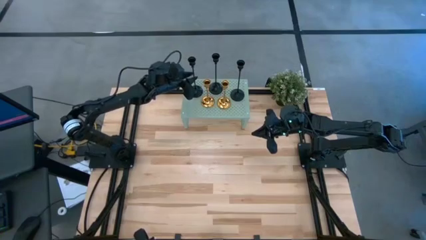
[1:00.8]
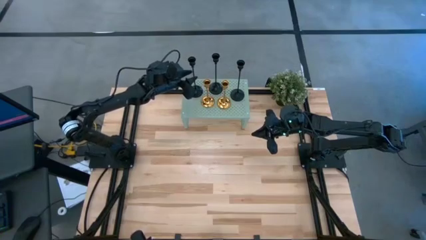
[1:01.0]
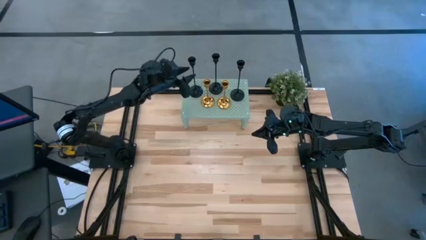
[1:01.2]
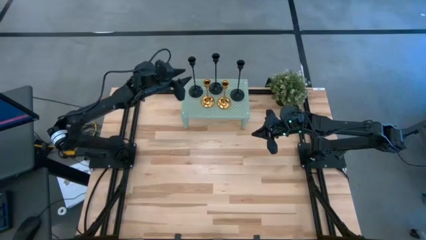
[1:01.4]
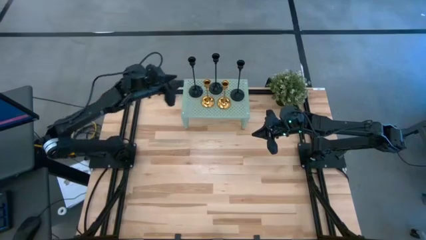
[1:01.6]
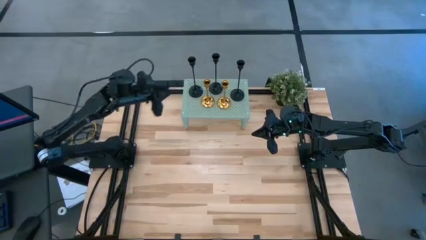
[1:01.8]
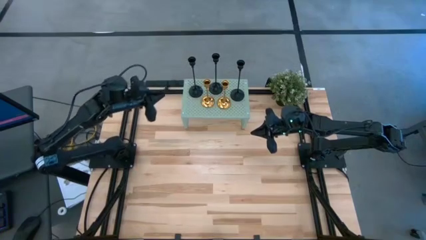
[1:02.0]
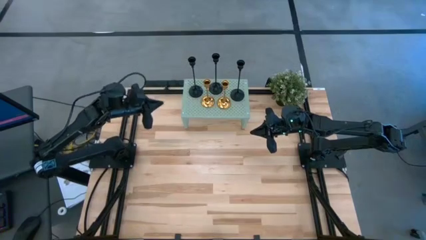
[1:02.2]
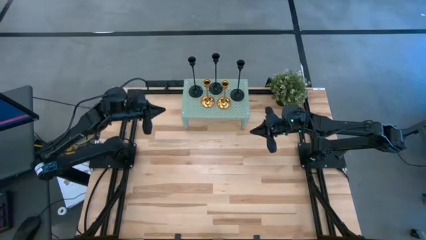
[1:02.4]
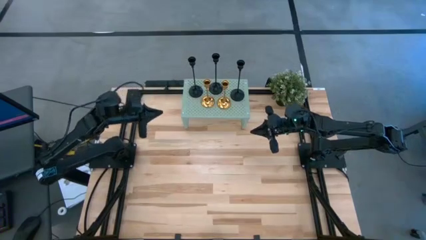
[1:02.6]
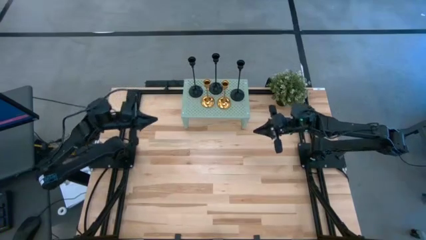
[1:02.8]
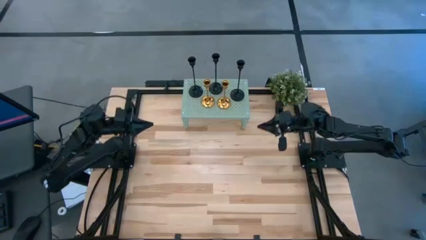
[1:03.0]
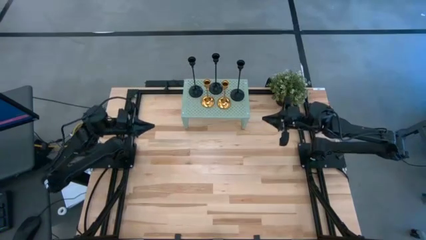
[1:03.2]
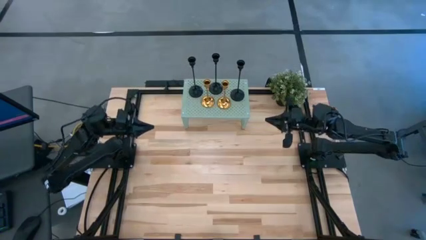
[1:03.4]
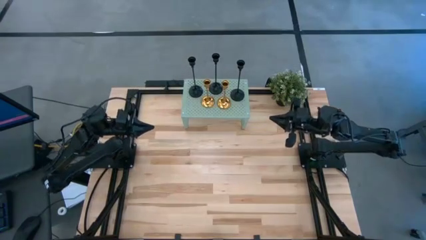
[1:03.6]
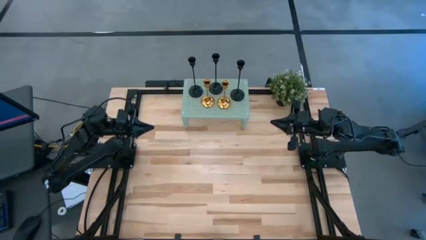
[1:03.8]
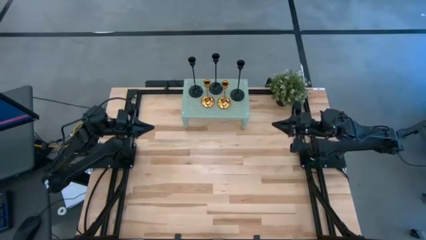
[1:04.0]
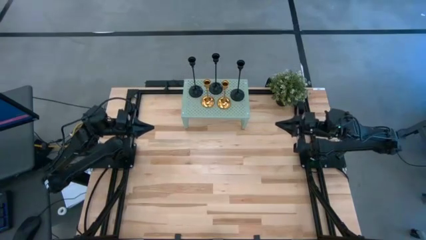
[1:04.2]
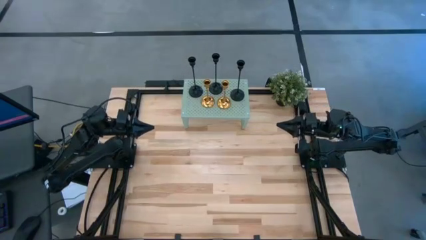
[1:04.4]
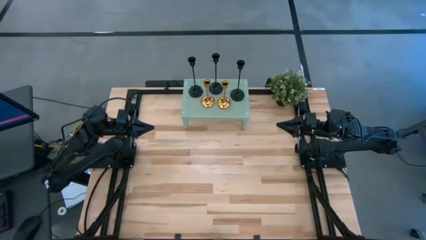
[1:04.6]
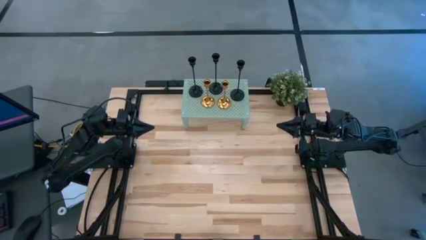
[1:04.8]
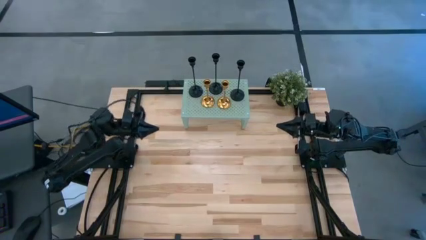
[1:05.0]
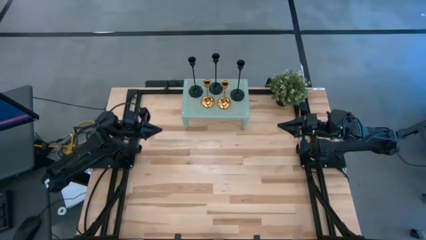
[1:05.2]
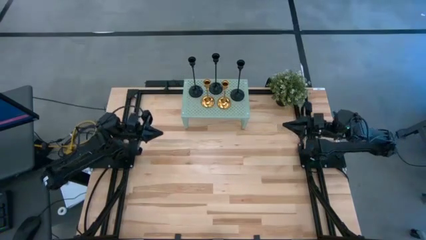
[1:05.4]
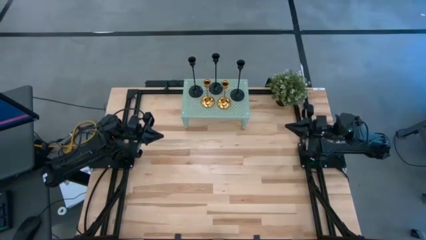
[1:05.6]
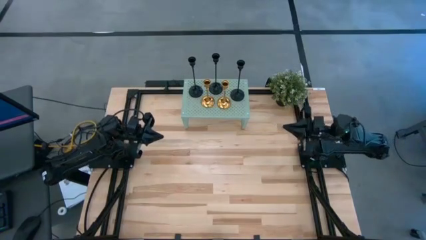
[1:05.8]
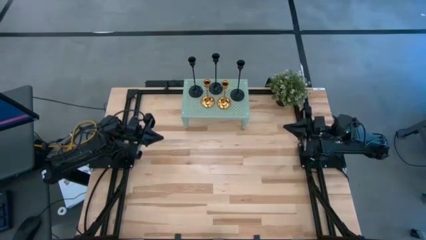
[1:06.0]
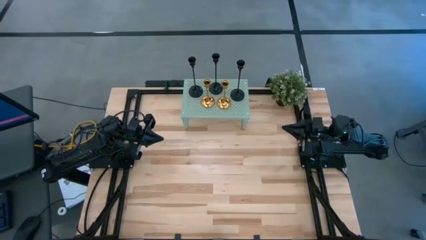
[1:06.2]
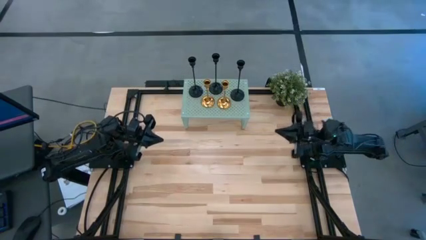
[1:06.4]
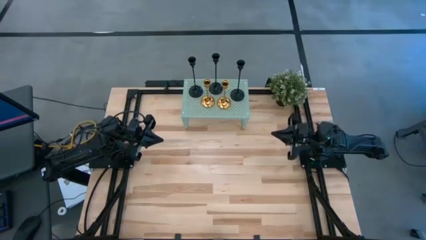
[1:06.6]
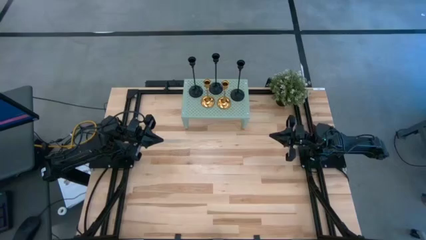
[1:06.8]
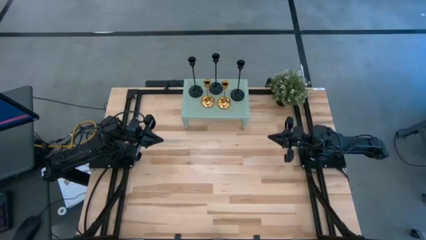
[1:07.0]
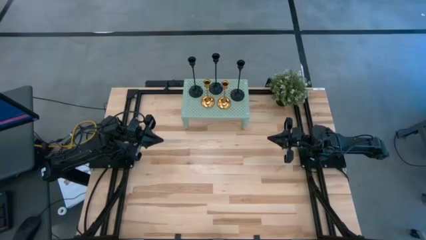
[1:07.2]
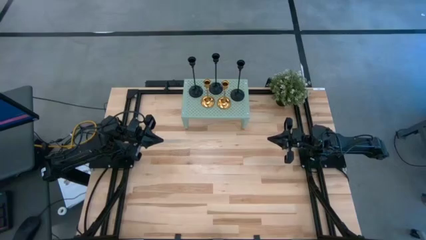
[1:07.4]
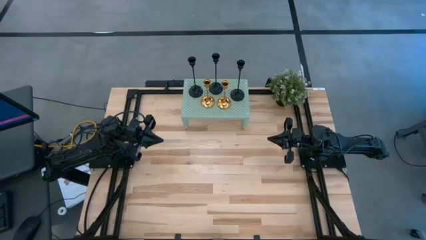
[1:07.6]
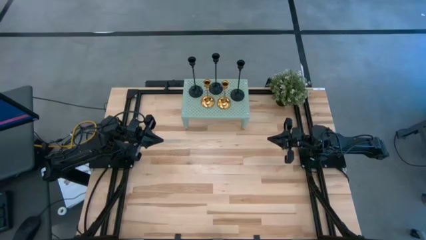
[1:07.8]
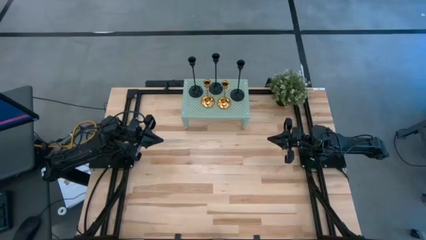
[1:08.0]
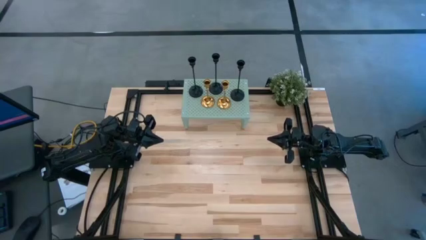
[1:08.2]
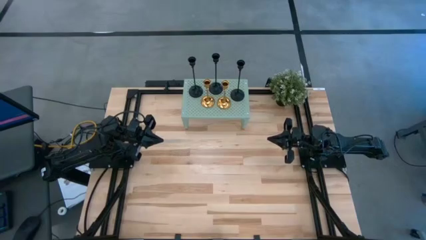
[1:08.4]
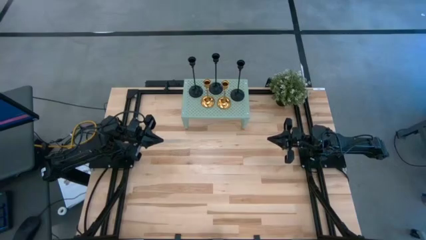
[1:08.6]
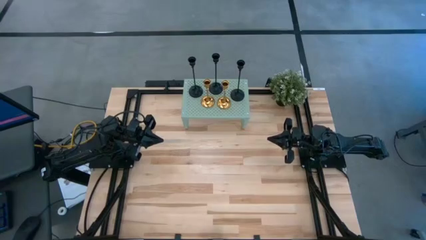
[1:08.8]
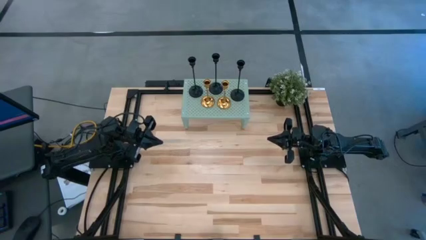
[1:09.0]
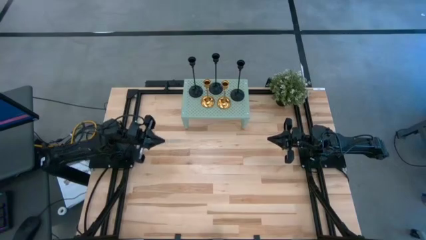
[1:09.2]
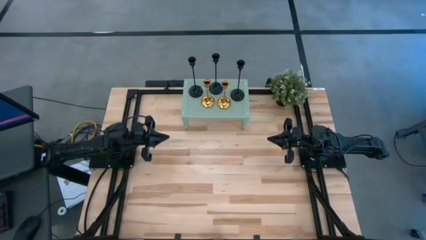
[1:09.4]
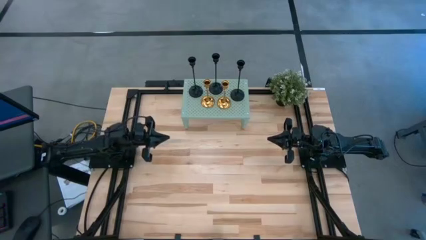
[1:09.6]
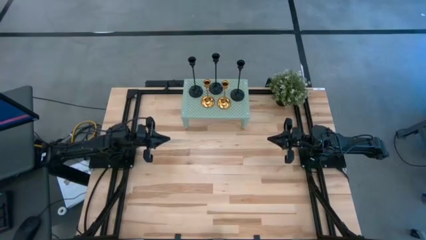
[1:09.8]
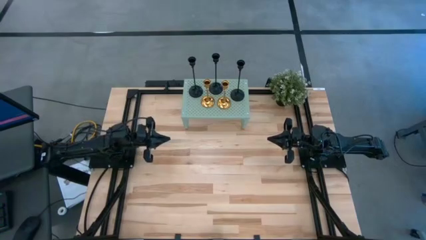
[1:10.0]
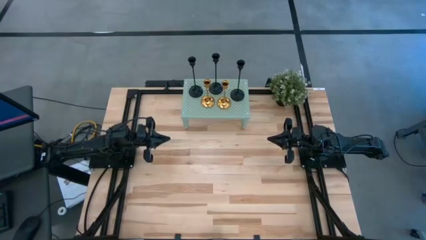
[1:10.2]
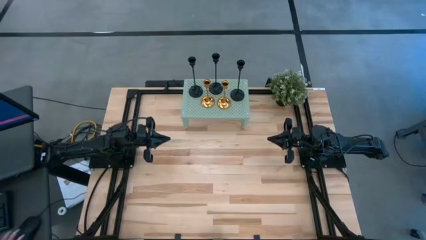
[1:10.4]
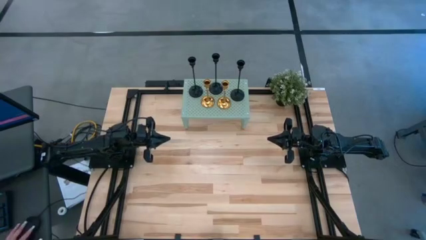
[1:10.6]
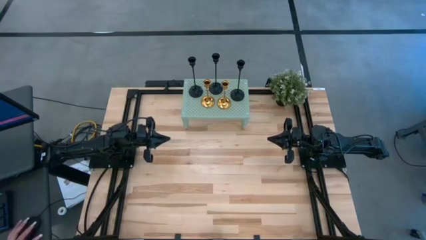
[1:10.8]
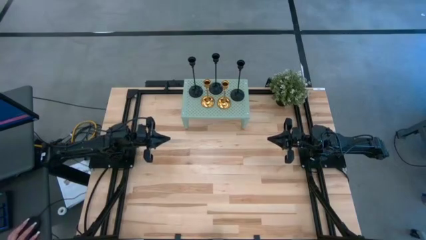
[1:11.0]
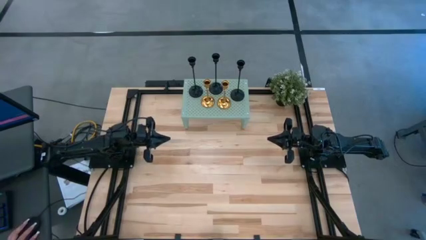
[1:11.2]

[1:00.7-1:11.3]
Task: Pick & Place candle stick holders
Return to Home Position

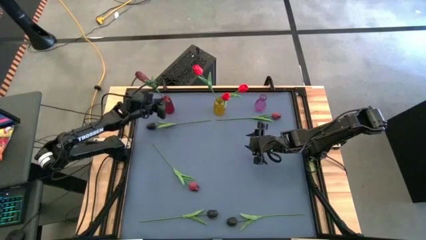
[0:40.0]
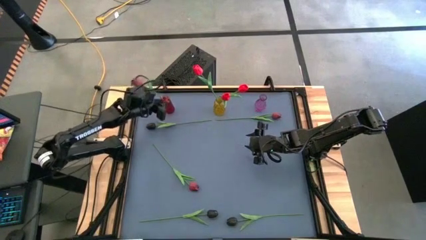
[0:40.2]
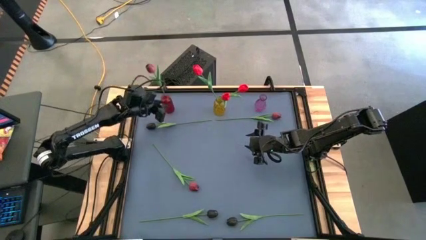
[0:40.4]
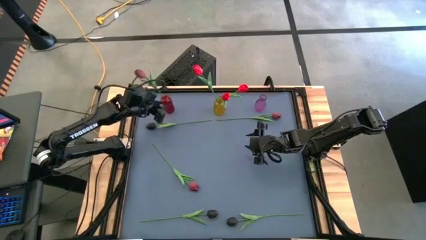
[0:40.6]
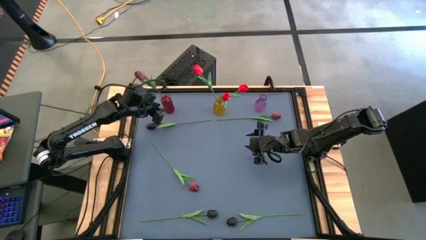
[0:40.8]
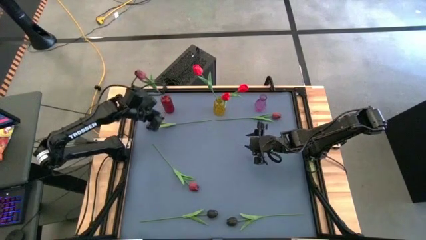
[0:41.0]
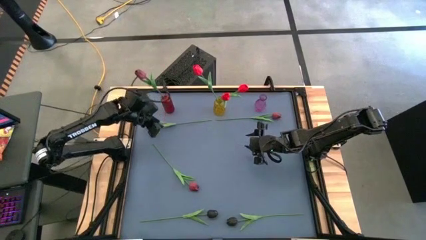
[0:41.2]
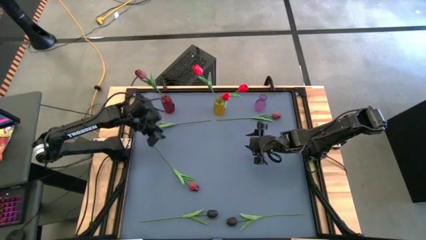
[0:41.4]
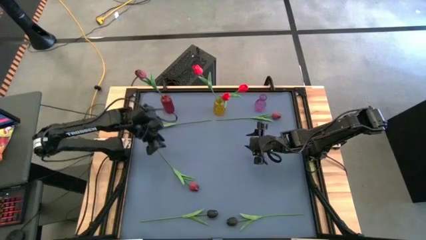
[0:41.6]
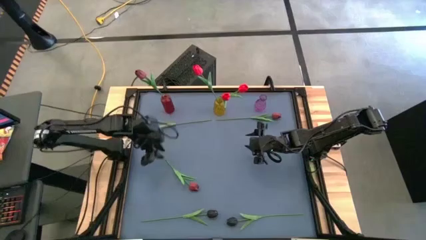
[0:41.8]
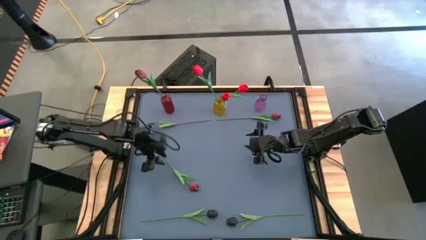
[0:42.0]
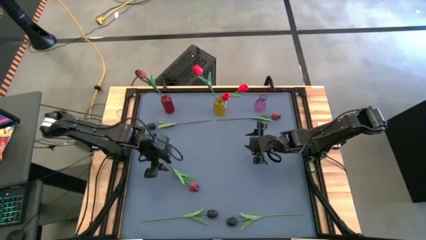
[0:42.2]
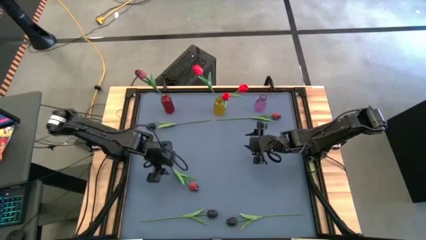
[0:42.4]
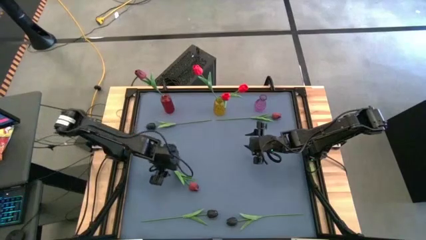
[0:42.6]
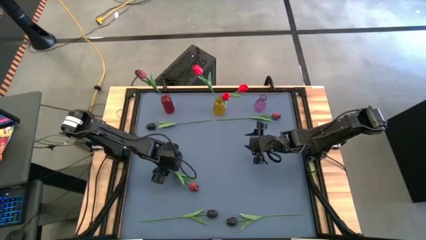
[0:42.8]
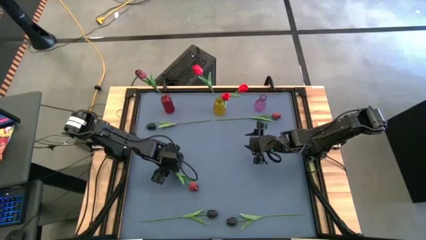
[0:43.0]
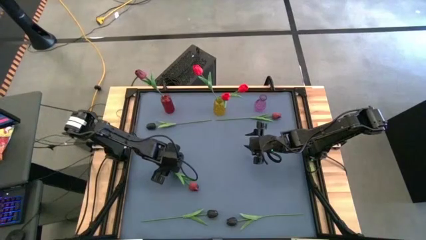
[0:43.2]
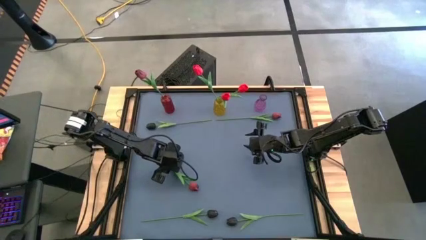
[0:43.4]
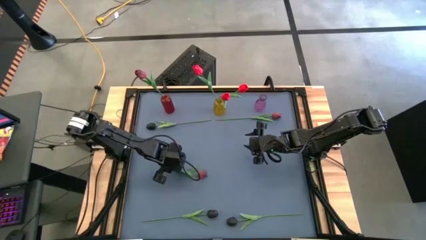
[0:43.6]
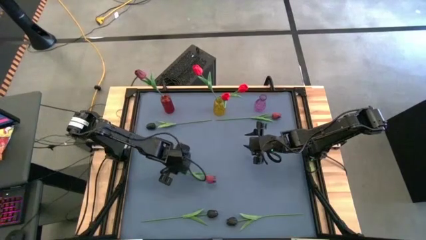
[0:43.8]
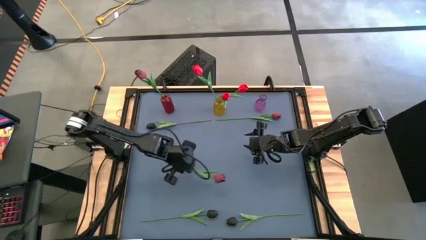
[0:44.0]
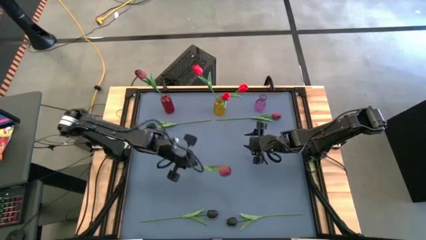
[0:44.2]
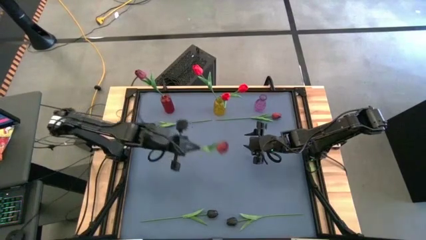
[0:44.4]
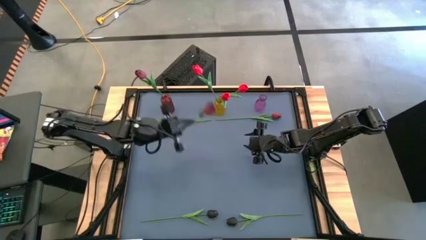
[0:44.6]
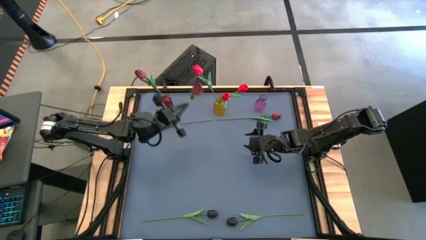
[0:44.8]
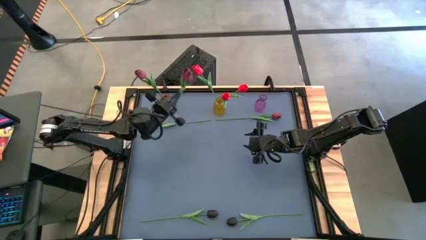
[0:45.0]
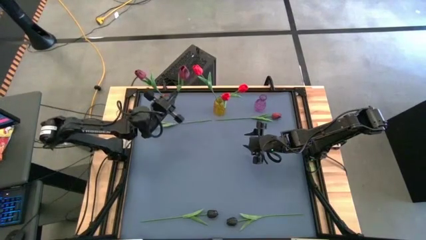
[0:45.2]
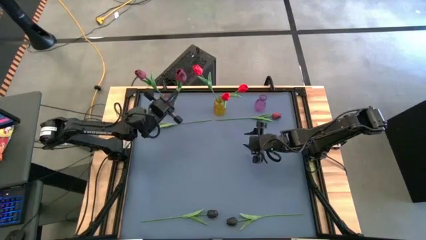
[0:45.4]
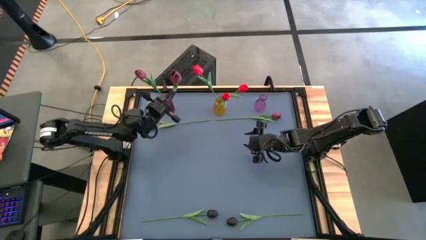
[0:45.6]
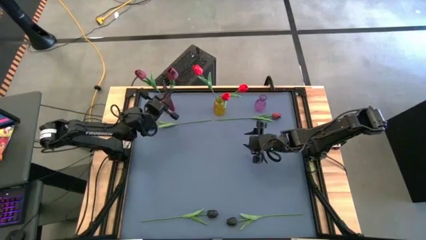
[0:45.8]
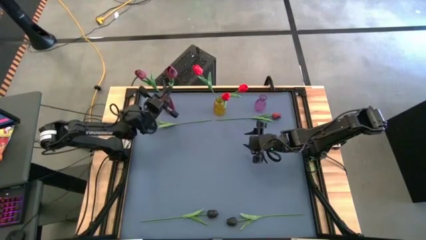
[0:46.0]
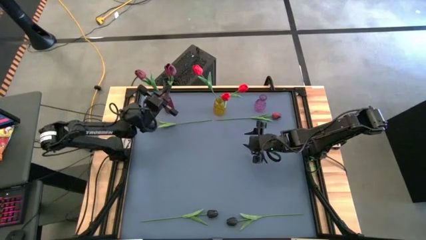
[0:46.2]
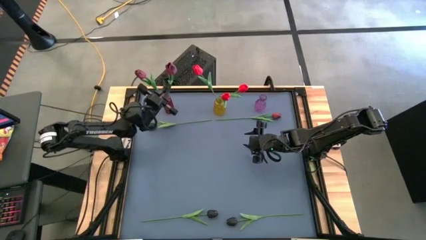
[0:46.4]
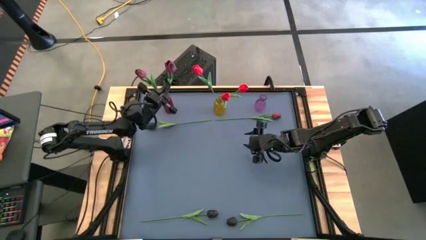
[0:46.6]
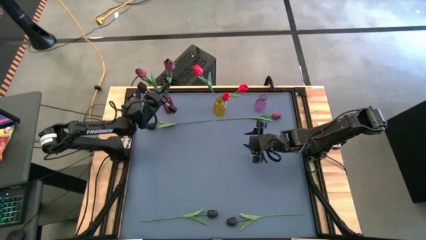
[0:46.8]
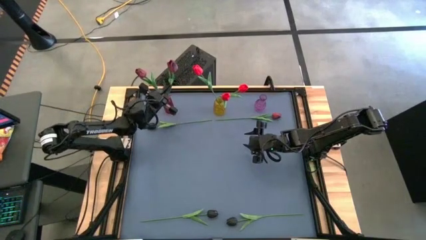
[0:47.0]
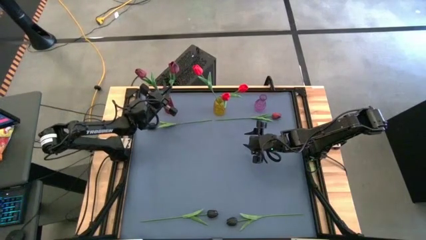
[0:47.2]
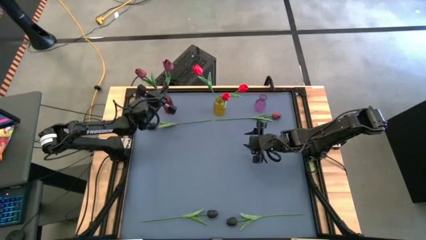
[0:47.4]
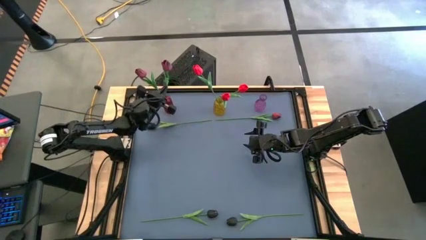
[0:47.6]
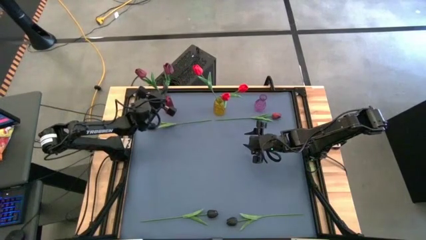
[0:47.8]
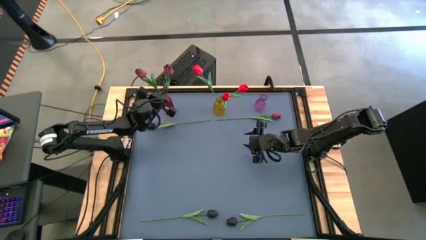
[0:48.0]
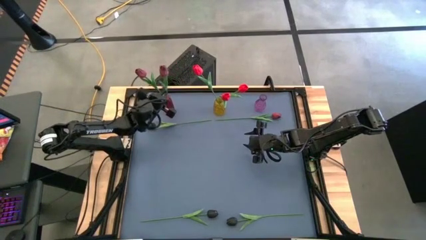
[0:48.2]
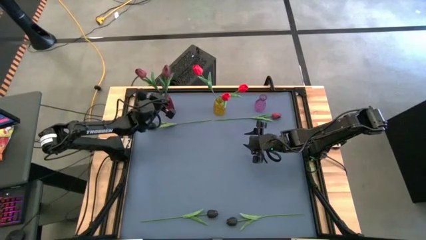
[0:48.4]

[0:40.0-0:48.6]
Task: Sort flowers into vase by color
Put the bottom dark red tulip into the red vase
